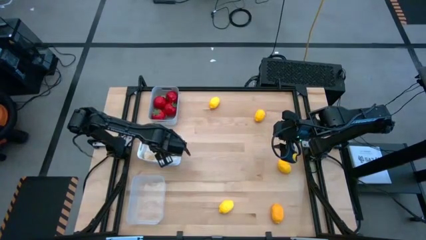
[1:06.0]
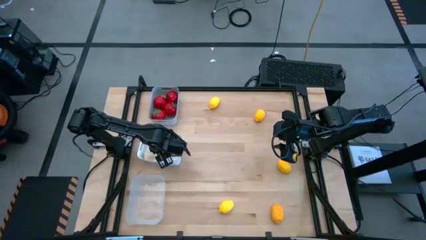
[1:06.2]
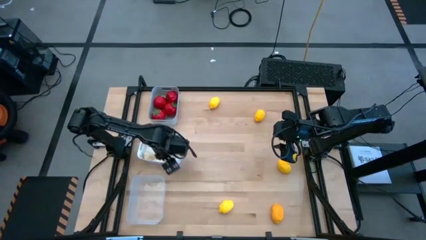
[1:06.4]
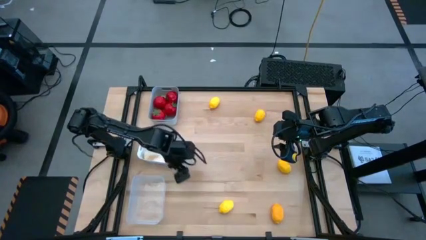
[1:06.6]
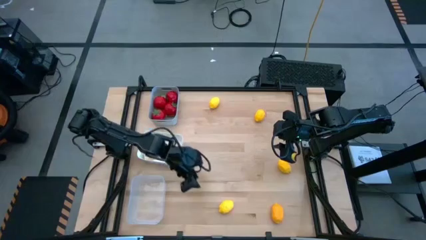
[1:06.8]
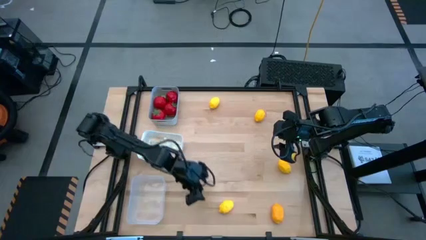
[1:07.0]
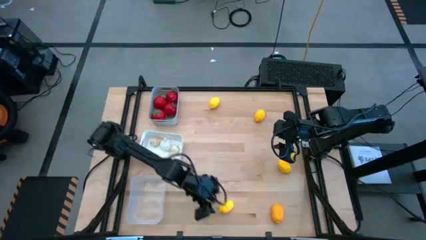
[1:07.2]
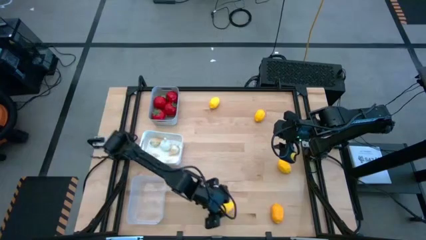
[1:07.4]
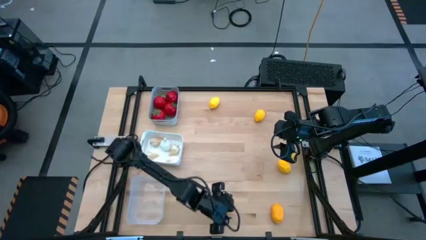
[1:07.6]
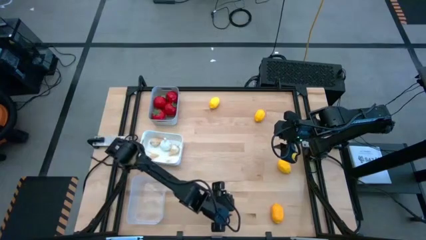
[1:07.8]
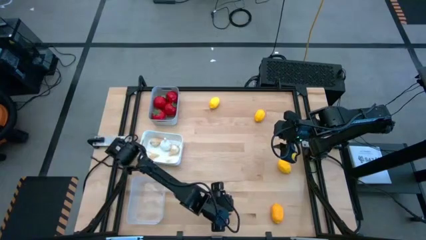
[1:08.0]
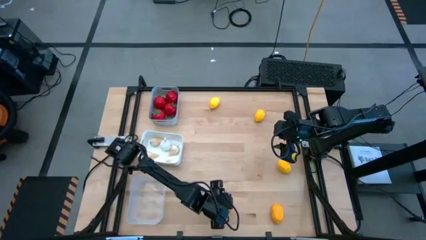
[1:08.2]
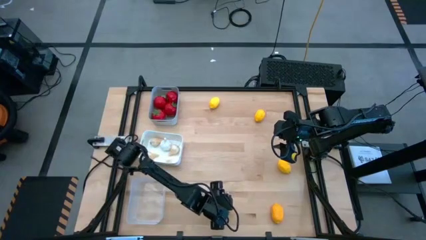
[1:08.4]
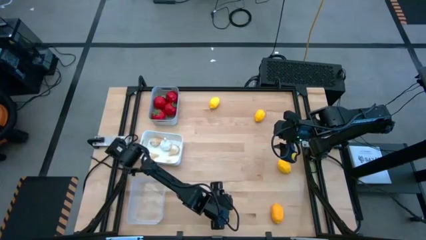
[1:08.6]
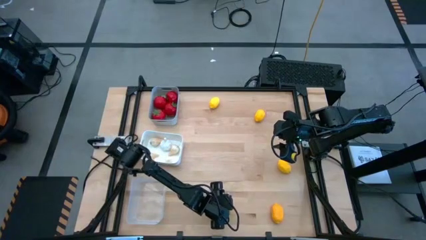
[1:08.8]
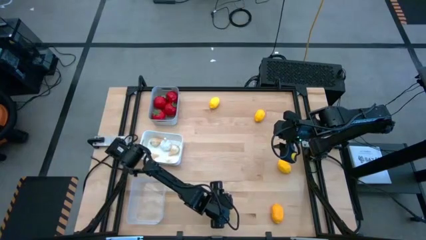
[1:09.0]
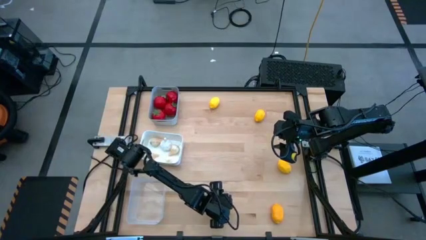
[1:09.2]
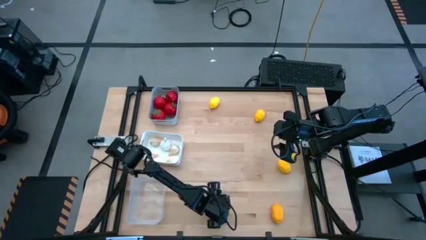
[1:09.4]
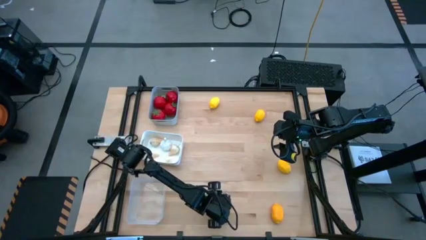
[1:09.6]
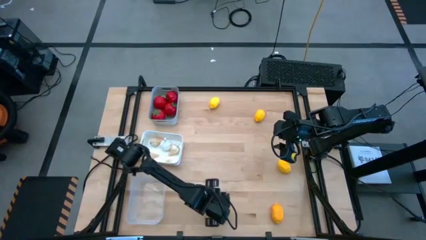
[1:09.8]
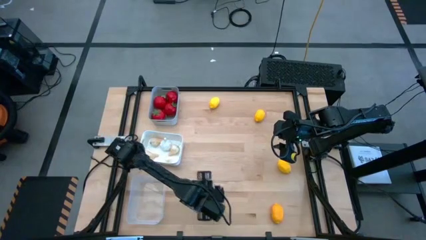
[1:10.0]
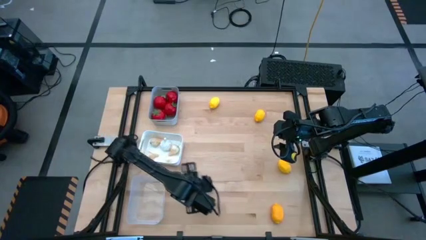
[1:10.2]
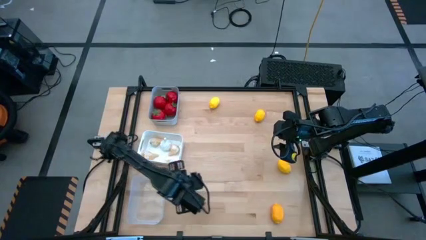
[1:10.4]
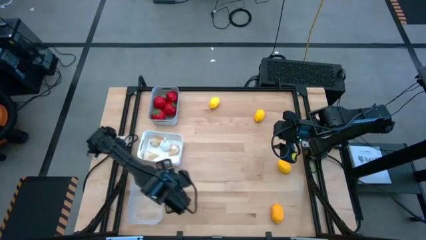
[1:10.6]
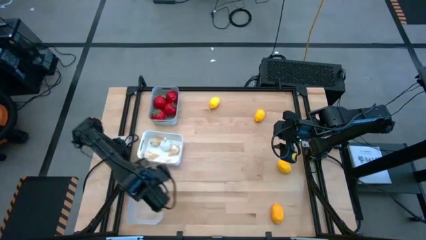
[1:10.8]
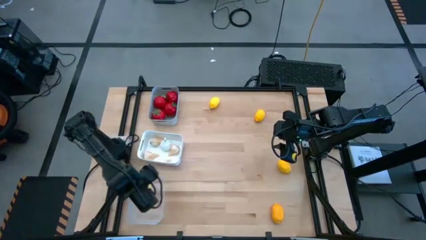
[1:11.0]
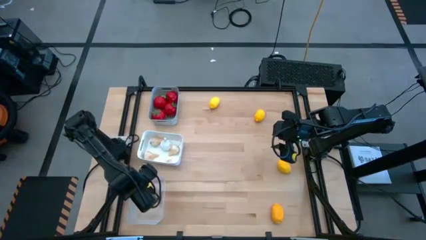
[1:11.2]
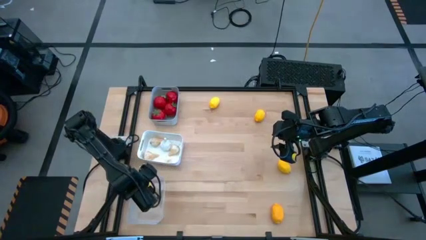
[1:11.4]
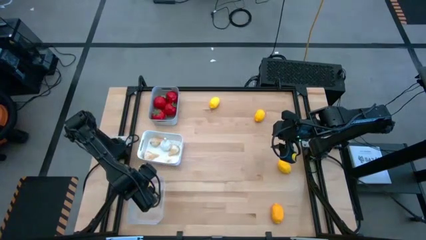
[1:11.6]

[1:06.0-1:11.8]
Task: Sort produce into baskets
Put the yellow lemon into the transparent bin

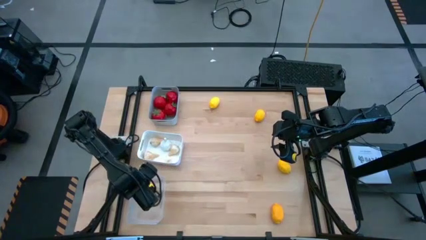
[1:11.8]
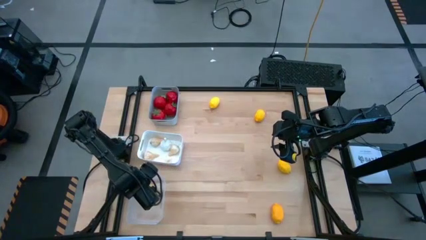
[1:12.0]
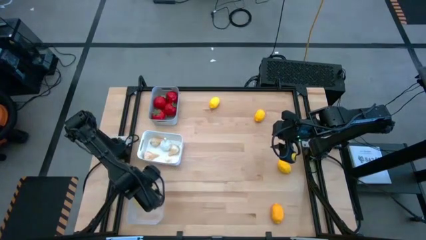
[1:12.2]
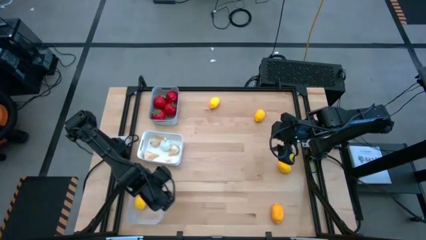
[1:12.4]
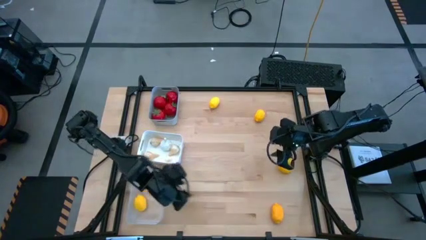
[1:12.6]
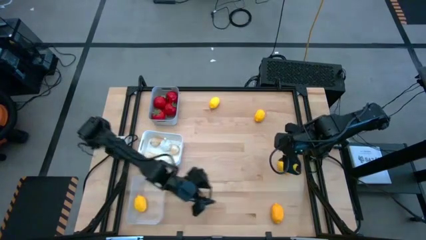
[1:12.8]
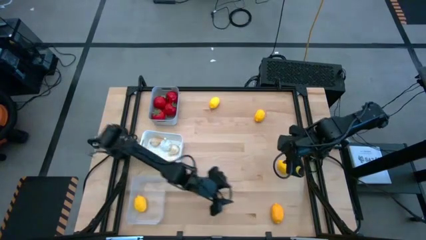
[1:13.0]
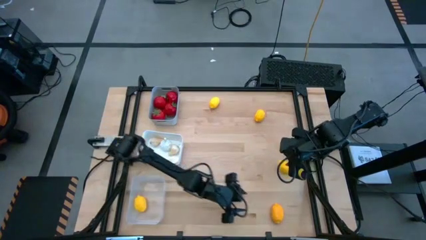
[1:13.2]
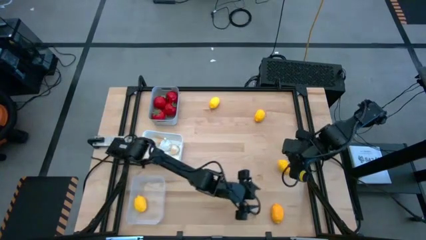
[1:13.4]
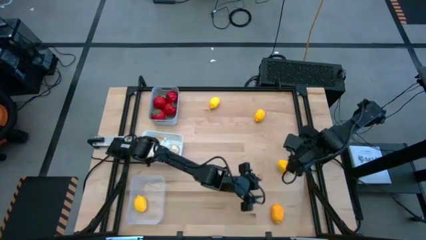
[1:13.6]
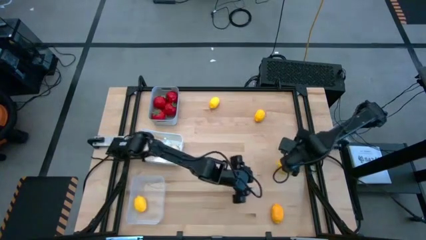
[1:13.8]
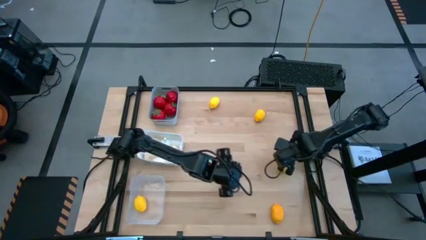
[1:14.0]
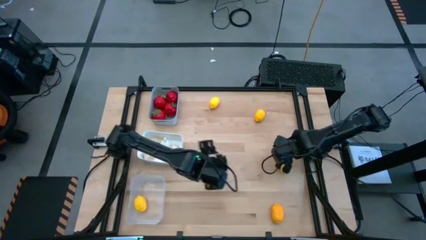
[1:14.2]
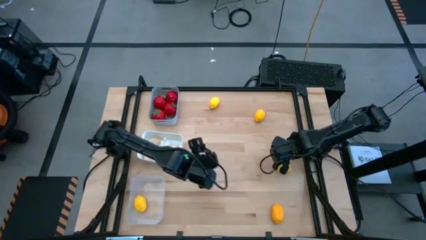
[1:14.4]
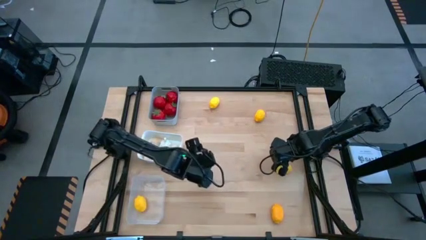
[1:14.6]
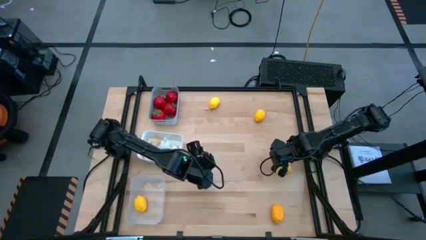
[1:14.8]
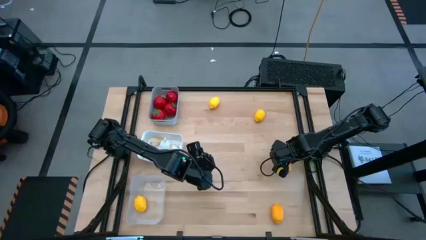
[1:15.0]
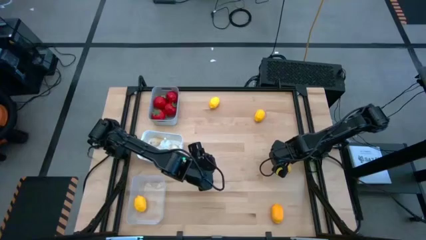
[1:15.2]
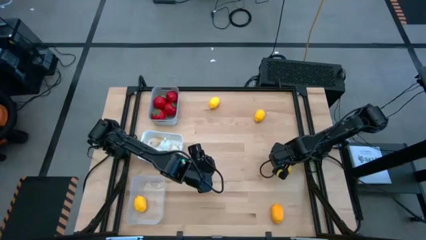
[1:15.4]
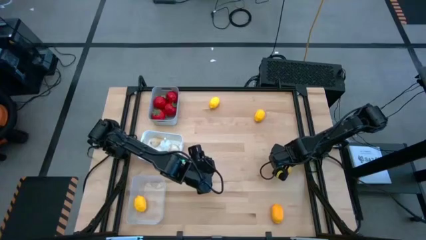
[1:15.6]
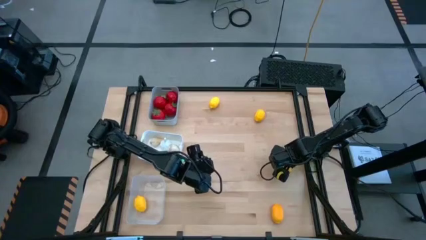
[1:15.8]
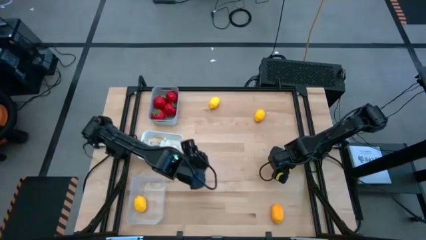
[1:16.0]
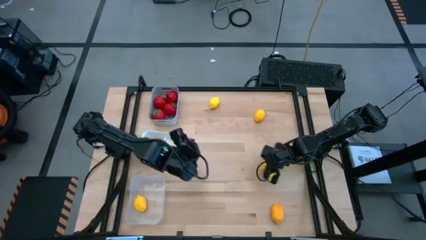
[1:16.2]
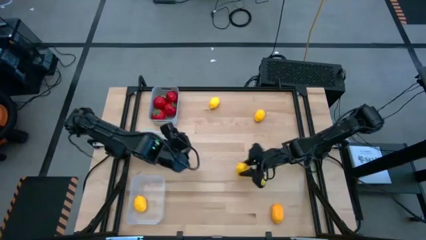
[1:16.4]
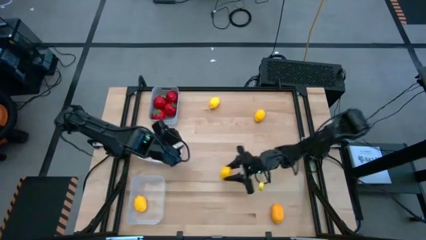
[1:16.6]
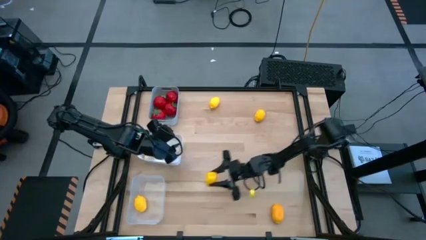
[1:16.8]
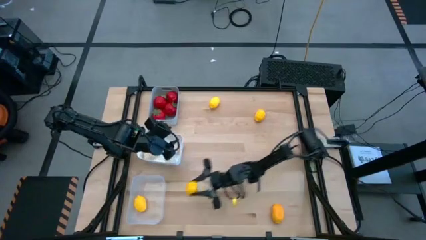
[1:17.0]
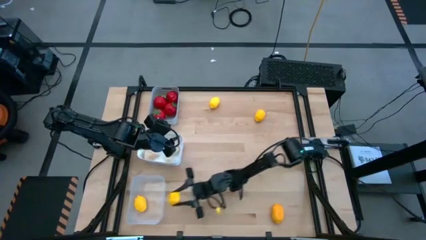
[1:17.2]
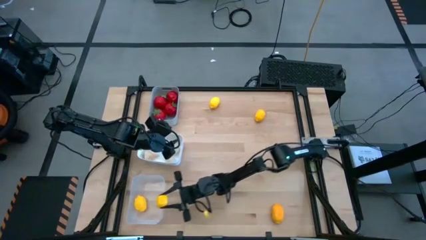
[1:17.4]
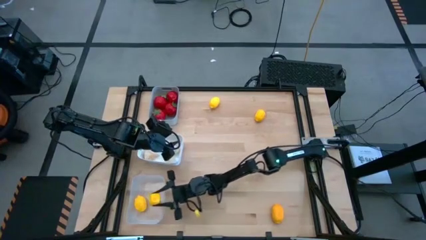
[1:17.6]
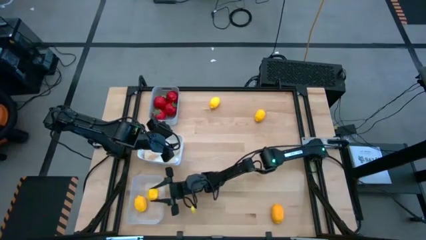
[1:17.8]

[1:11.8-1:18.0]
Put the yellow lemon into the transparent bin

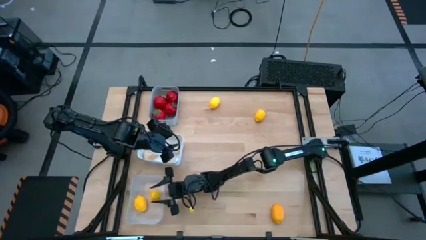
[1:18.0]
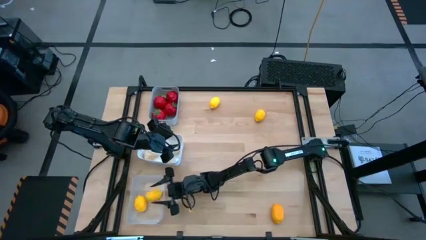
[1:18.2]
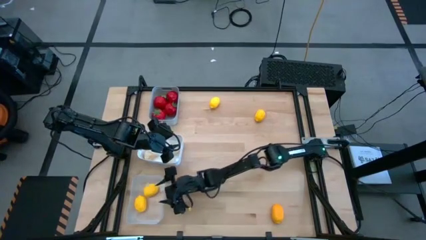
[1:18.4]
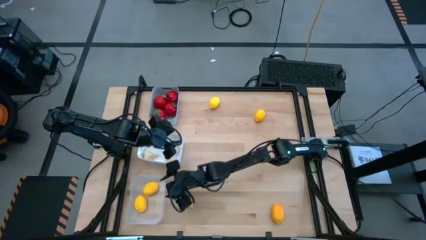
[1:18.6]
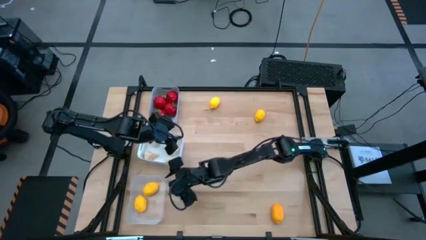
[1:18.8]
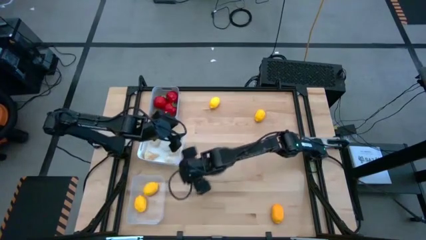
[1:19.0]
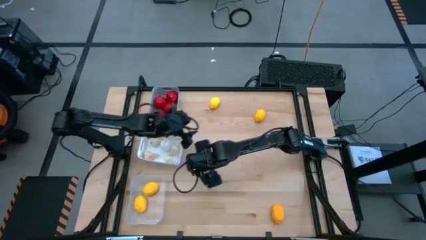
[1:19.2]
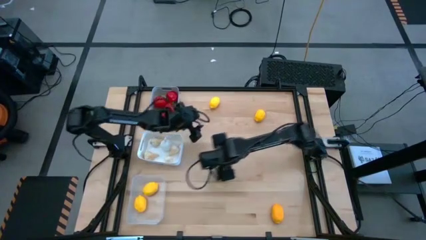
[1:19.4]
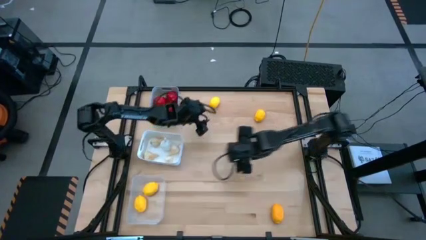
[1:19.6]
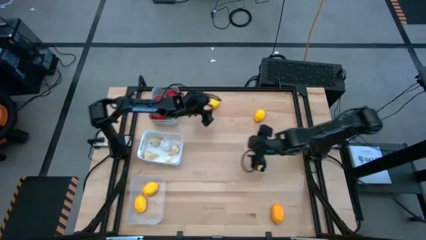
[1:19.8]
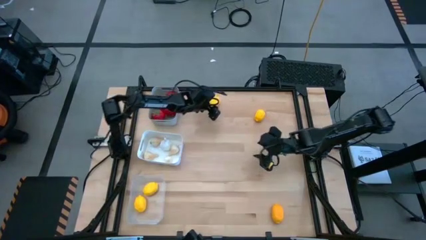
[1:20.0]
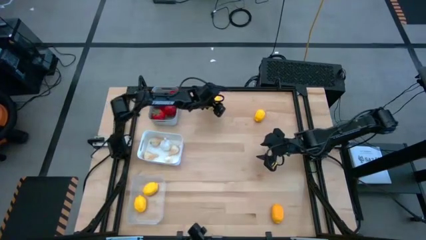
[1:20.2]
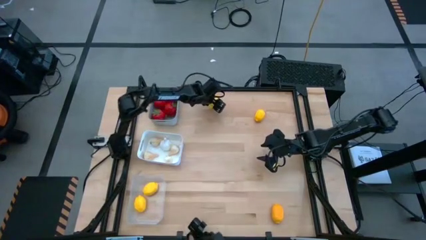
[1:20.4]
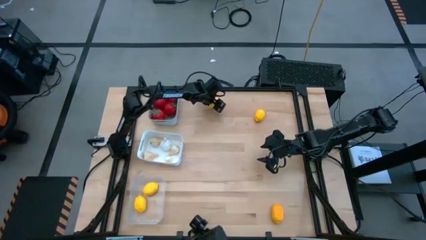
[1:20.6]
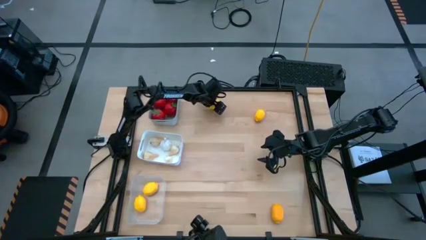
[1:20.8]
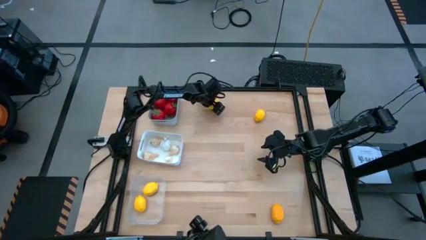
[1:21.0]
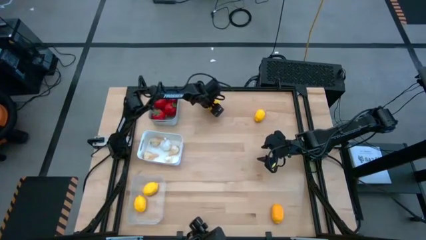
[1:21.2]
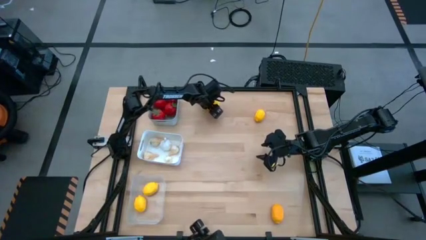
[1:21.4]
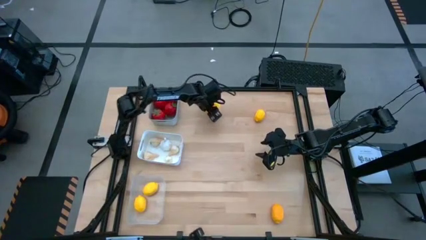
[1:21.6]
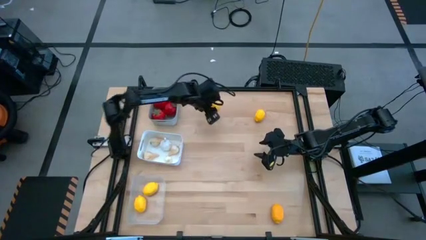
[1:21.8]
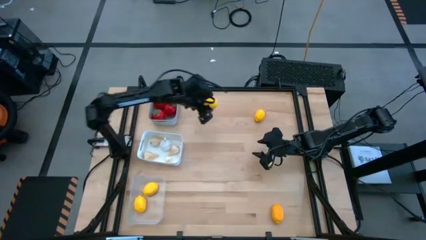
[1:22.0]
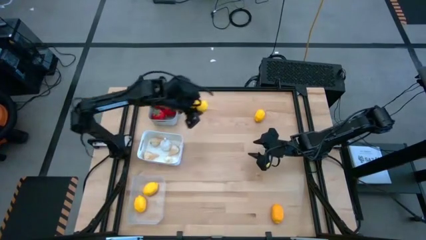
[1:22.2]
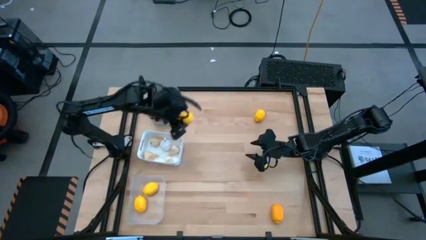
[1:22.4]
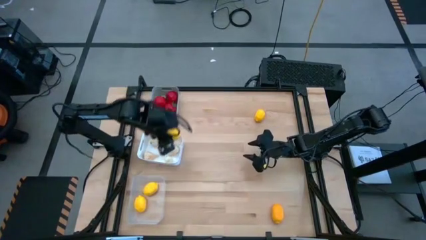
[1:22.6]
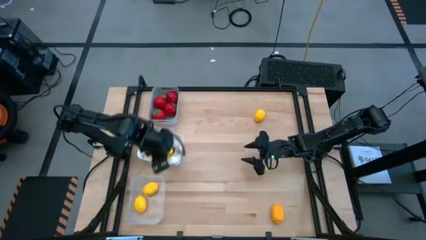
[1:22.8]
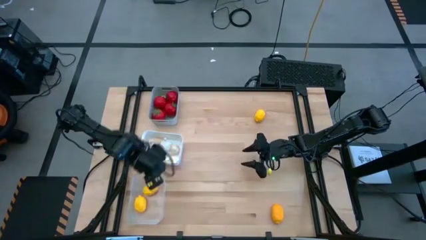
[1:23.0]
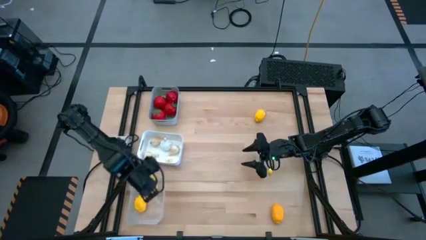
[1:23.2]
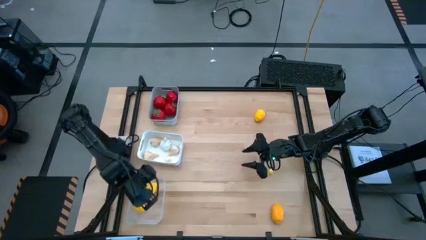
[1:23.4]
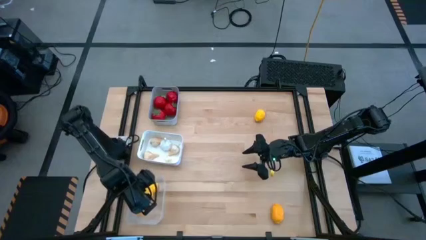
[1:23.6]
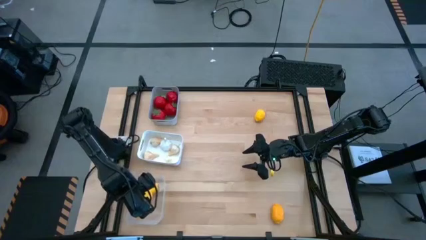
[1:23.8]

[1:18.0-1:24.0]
Put the yellow lemon into the transparent bin
